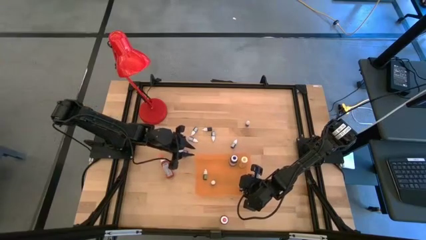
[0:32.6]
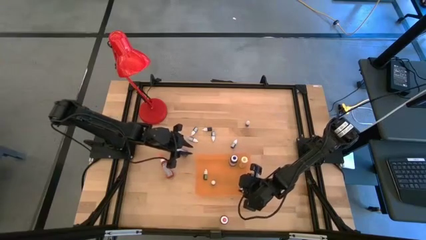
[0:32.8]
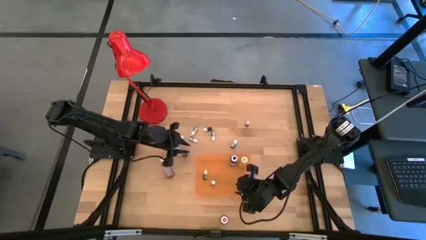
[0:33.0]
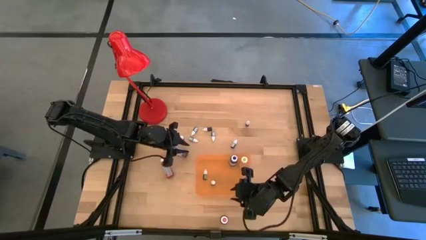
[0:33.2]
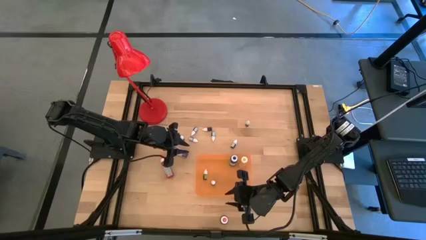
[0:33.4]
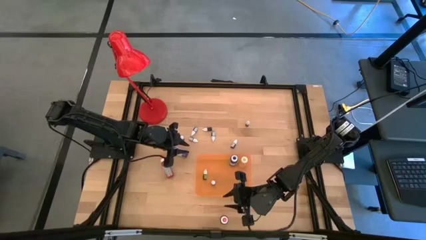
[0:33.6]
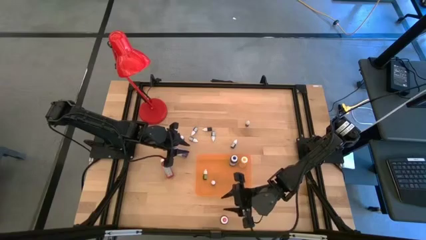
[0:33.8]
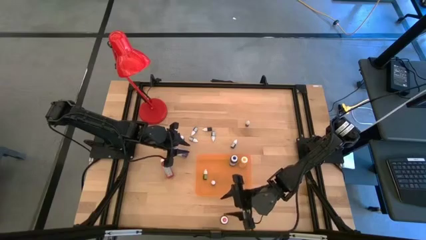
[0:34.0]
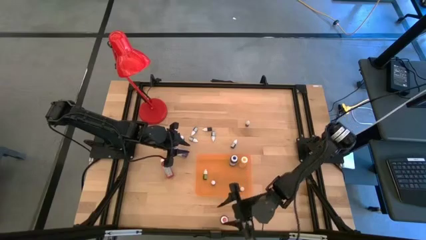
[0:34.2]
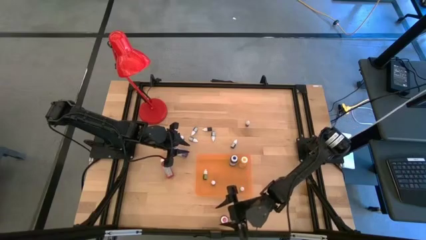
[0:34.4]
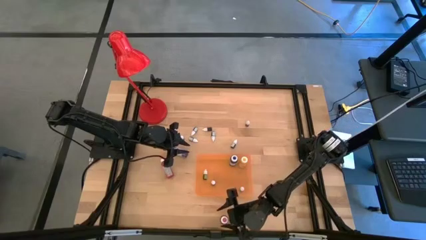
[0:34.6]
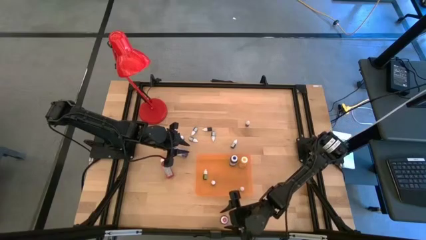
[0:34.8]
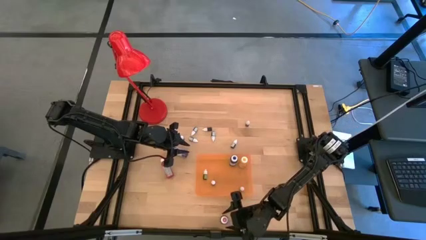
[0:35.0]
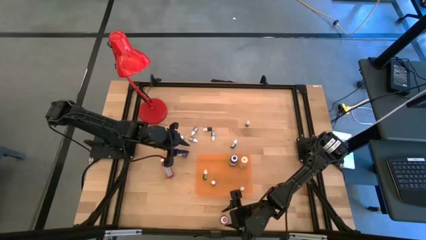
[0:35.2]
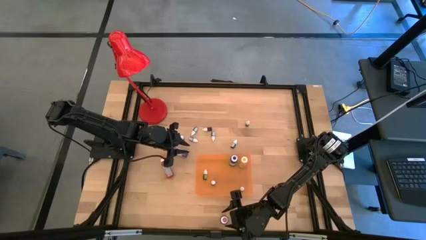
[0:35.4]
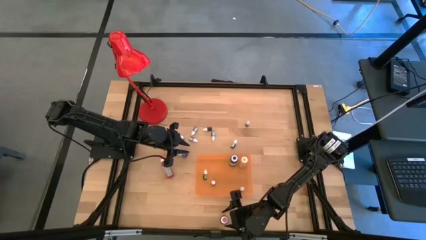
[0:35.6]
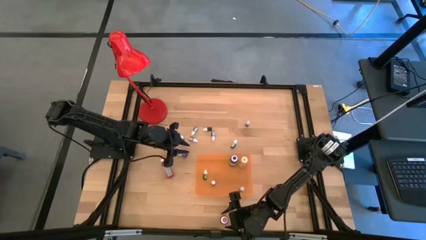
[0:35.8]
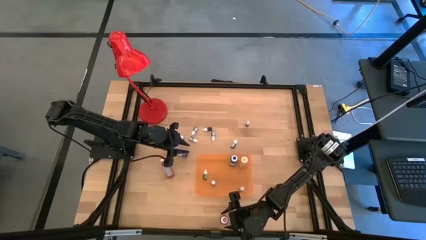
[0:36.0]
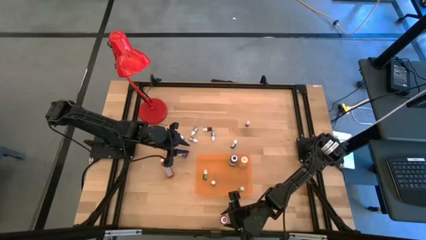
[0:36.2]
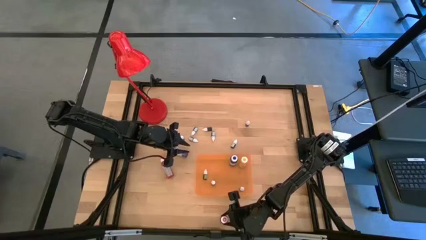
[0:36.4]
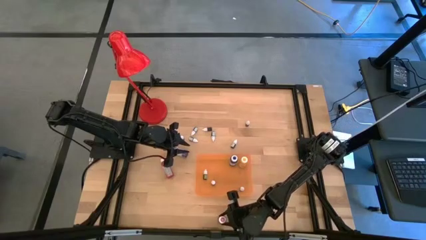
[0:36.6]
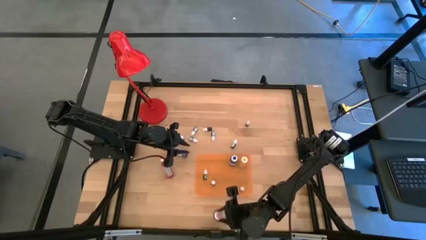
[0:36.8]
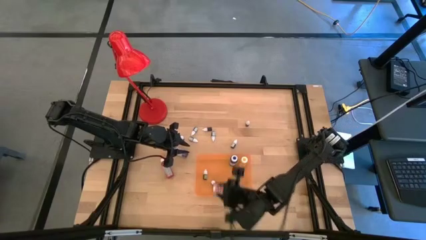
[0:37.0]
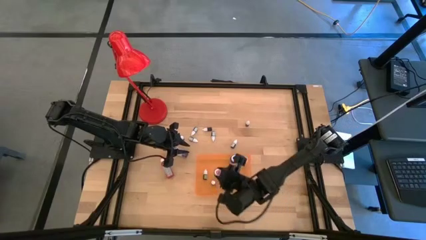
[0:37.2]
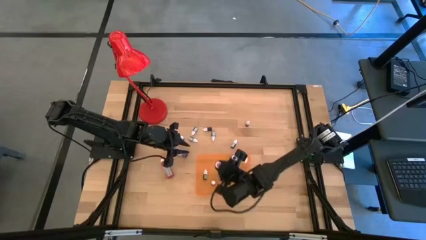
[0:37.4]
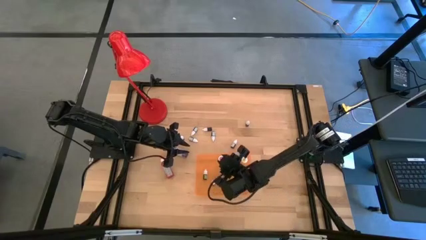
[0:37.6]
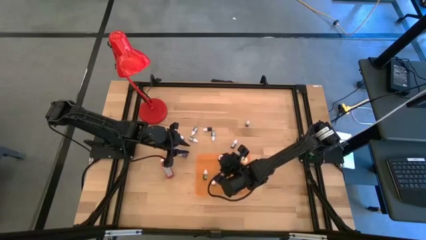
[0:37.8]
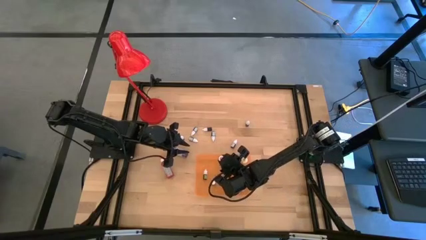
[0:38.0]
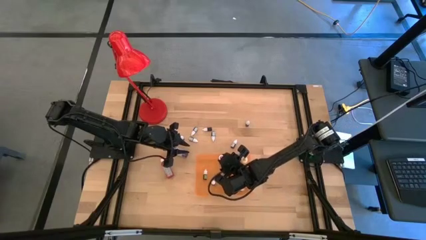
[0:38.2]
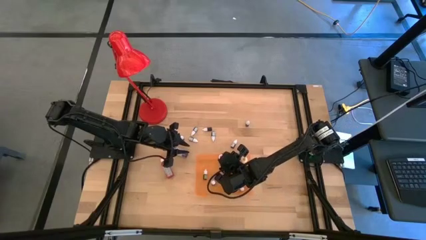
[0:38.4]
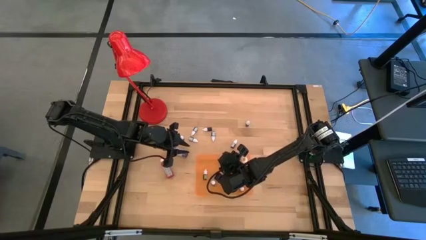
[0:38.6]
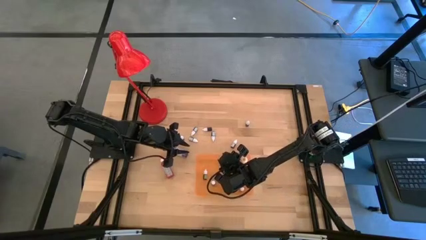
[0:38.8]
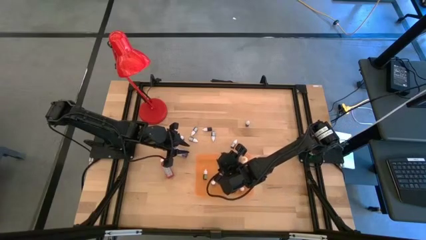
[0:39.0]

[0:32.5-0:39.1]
Task: Pick & Place food coloring
Put the big pink food coloring bottle into the orange bin

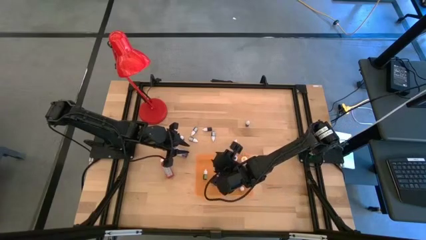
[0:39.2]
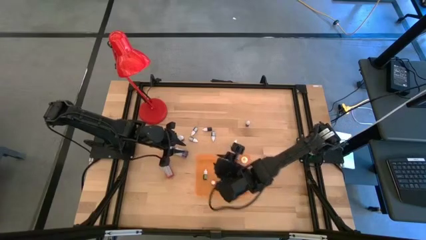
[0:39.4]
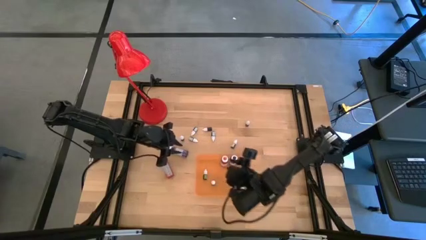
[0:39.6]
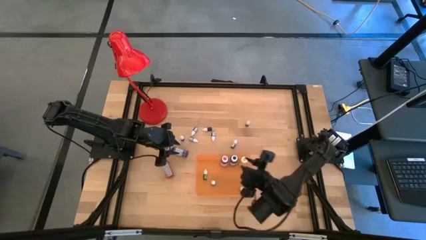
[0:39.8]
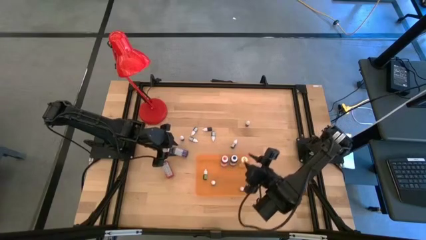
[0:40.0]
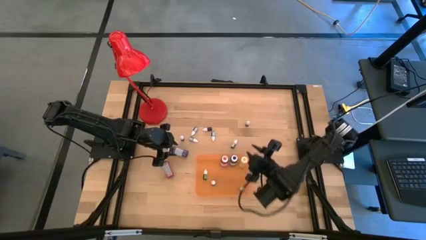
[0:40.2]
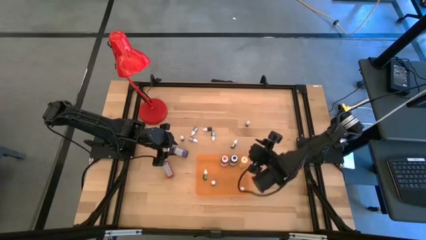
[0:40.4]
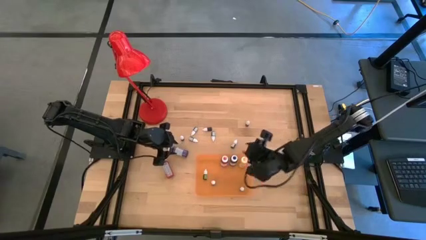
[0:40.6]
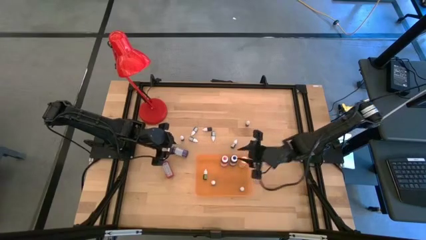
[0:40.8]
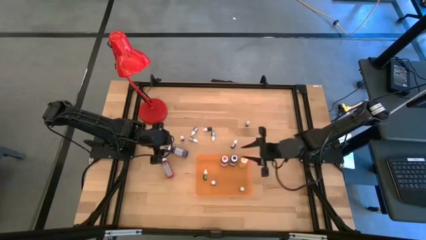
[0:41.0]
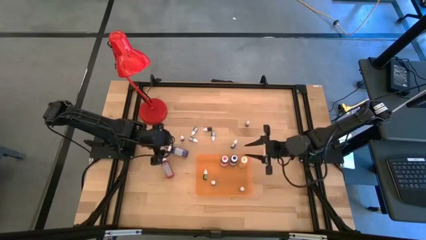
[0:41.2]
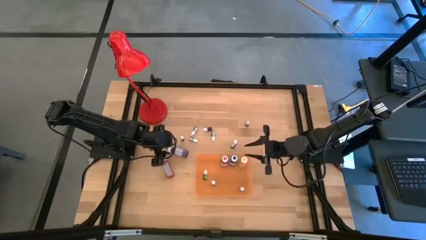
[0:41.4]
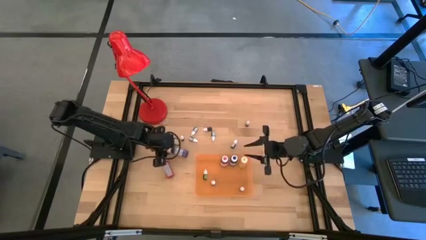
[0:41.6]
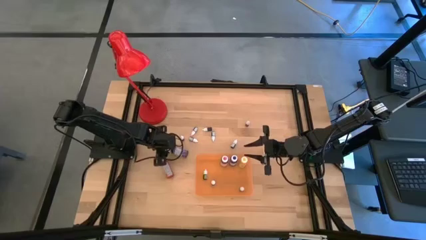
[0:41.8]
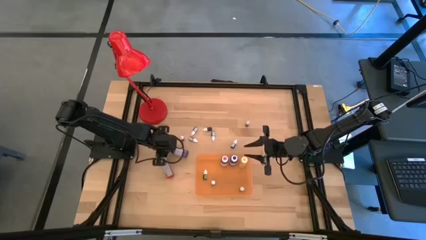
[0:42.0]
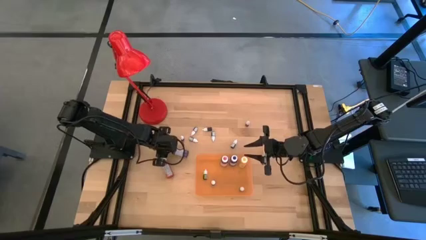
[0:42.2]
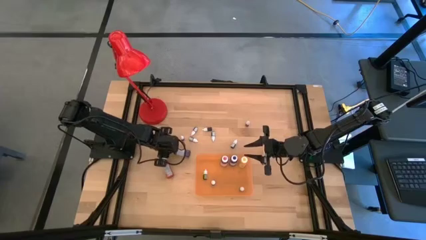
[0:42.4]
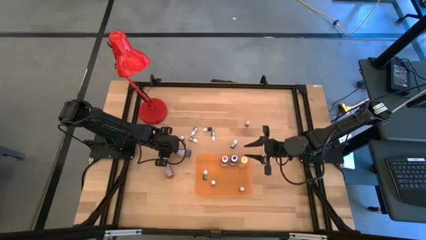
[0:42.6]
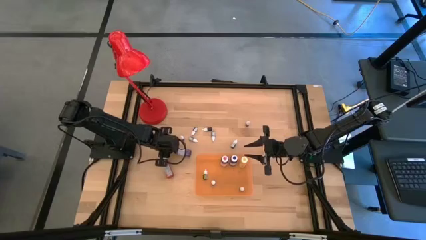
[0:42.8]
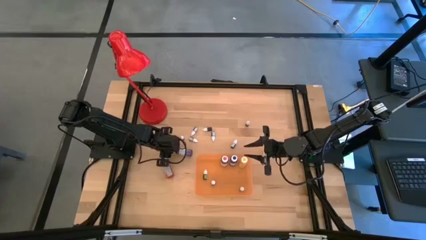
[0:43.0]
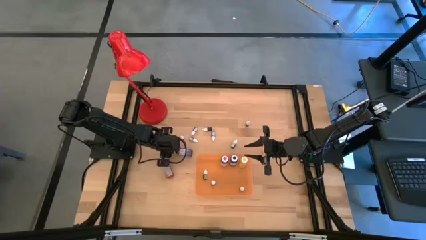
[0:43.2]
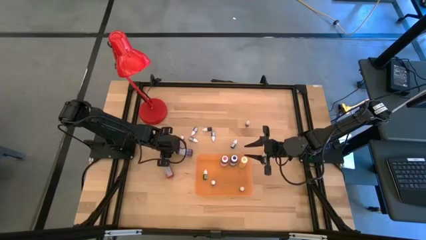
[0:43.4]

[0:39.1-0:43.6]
Put the big purple food coloring bottle into the orange bin

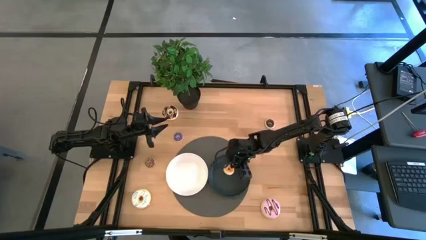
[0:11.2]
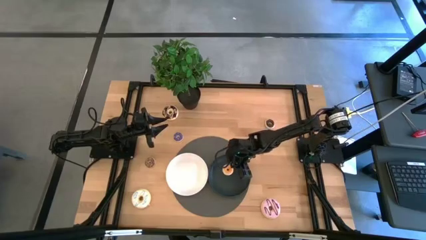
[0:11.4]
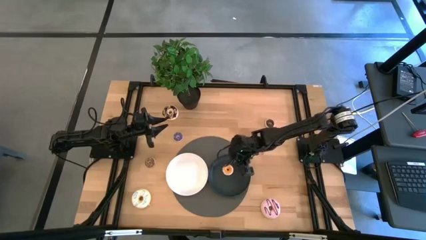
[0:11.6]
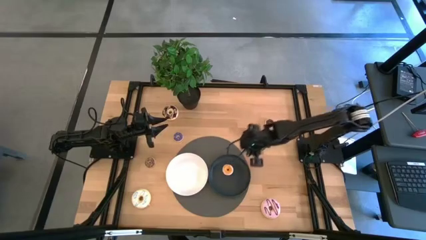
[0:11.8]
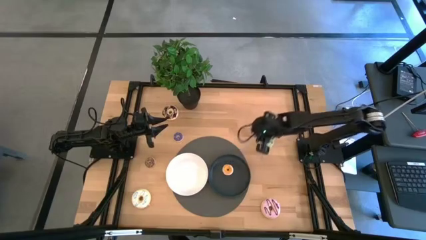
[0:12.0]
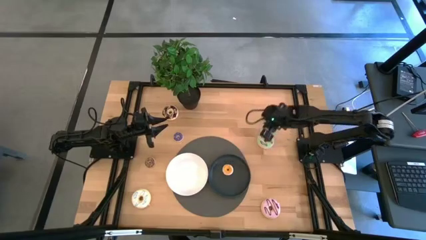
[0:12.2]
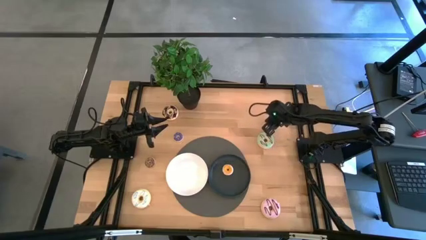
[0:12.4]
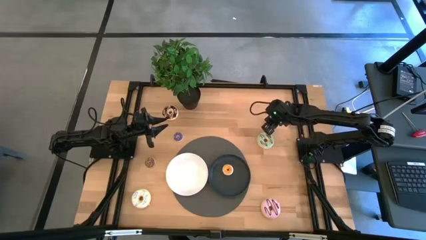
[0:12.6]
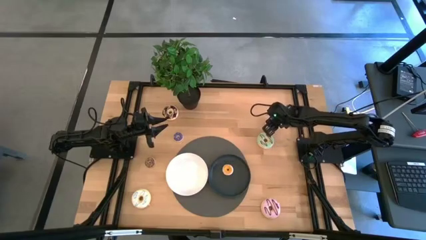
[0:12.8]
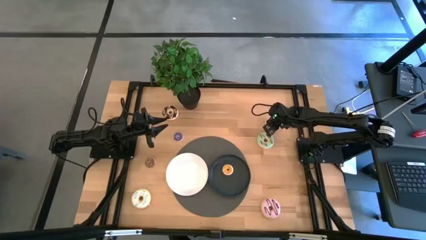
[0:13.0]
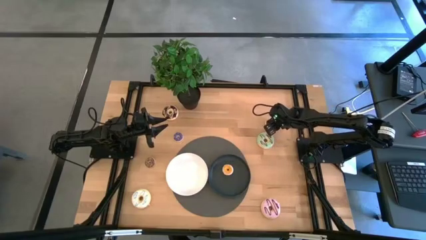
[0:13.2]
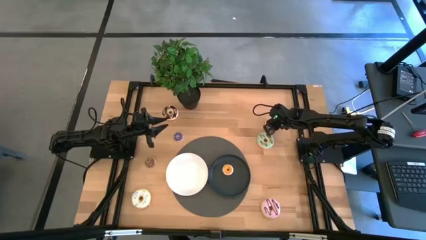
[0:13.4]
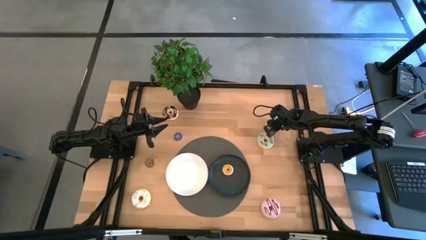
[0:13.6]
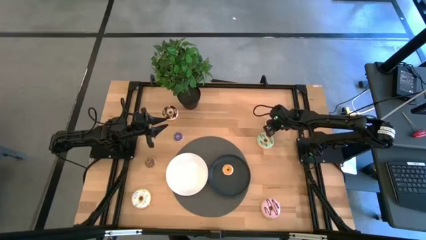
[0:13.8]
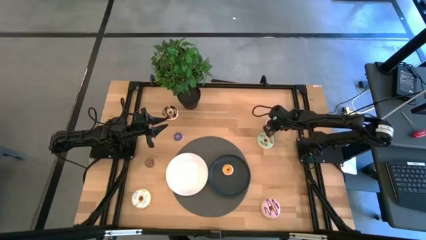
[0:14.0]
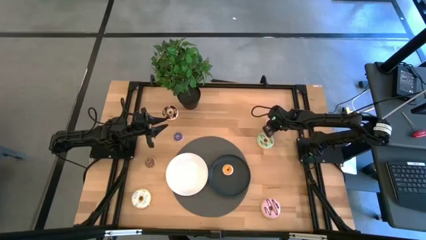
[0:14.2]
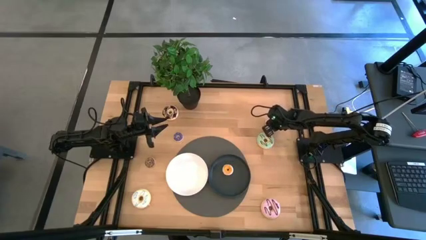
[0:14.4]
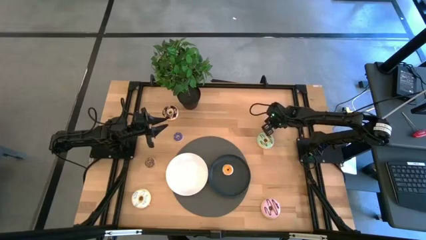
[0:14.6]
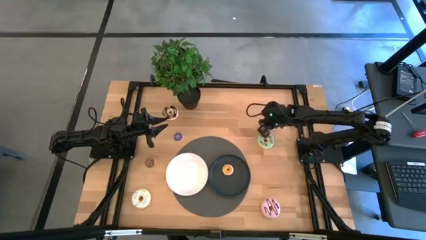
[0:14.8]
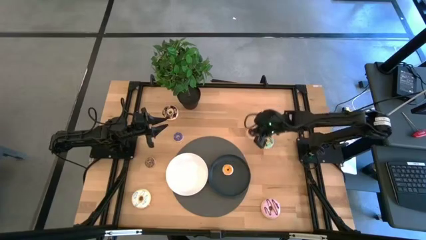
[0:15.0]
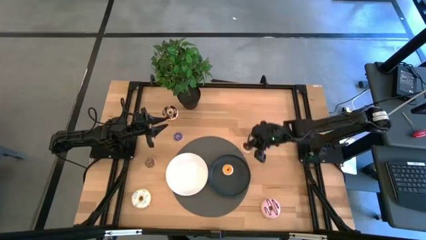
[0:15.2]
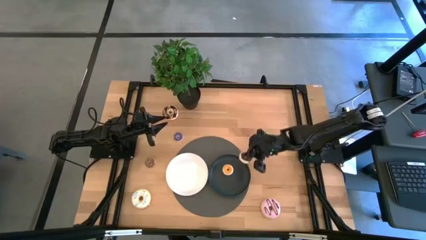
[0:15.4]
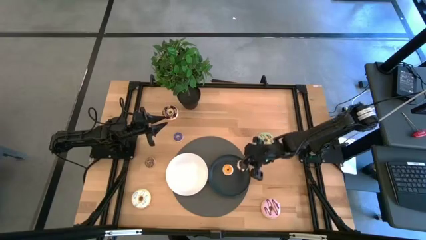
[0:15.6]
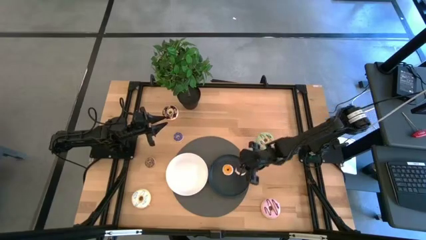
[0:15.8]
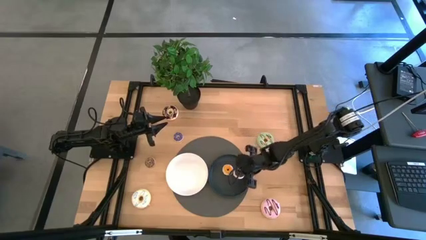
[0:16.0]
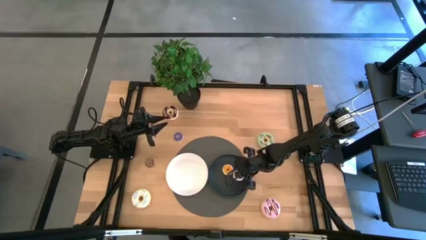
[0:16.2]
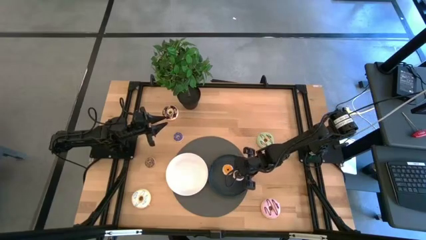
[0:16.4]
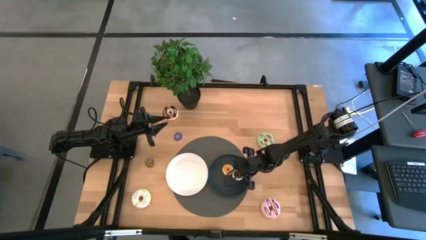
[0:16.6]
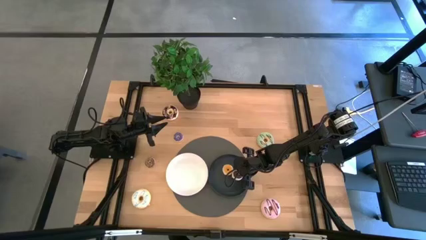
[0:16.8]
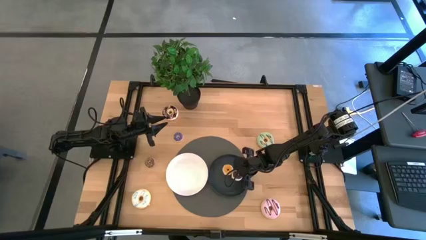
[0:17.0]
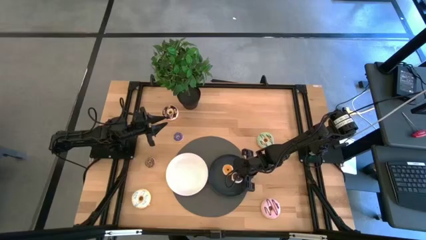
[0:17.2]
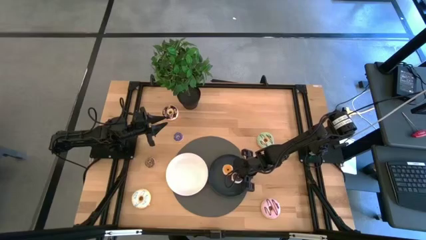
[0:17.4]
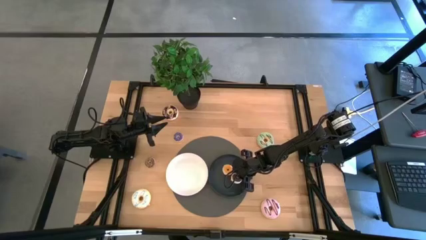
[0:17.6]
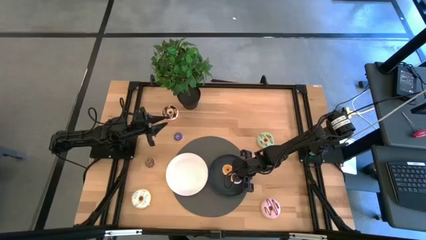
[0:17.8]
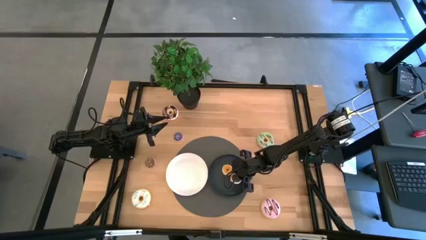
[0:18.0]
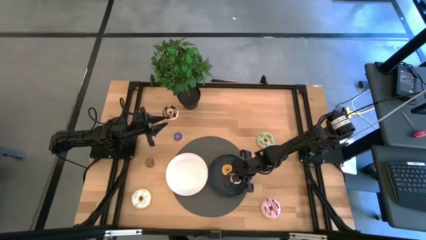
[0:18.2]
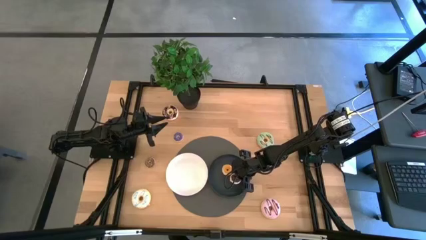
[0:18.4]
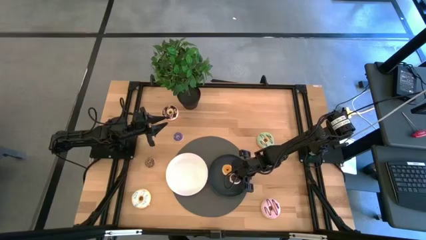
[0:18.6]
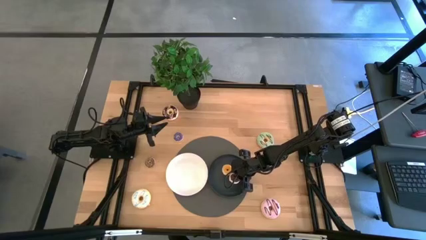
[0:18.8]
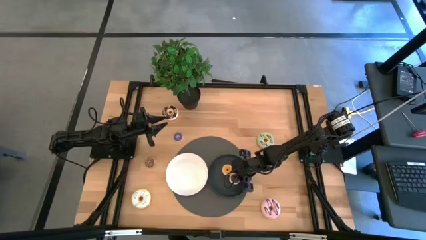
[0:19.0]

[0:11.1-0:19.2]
Task: Pick & Place donuts
Put the small black donut on the black plate
